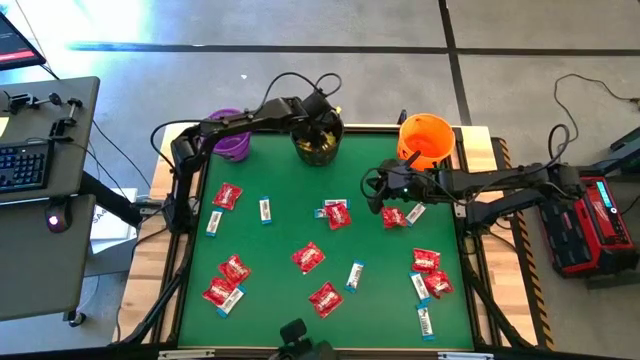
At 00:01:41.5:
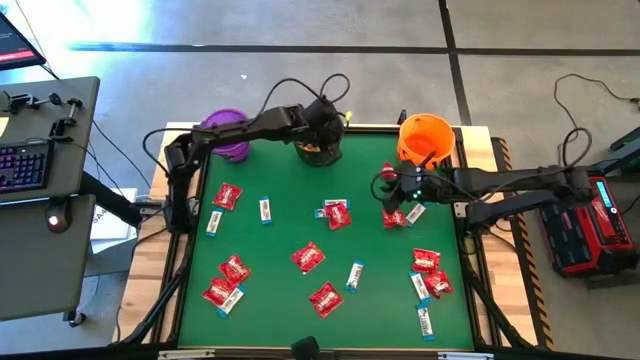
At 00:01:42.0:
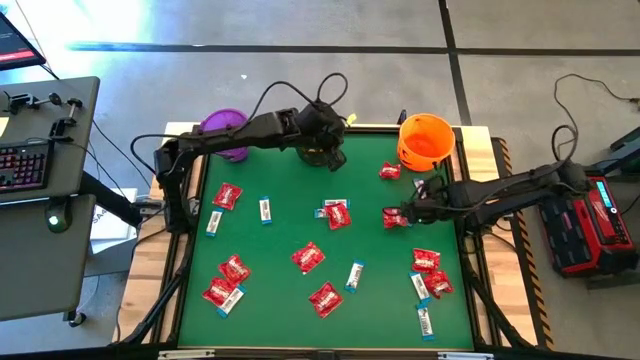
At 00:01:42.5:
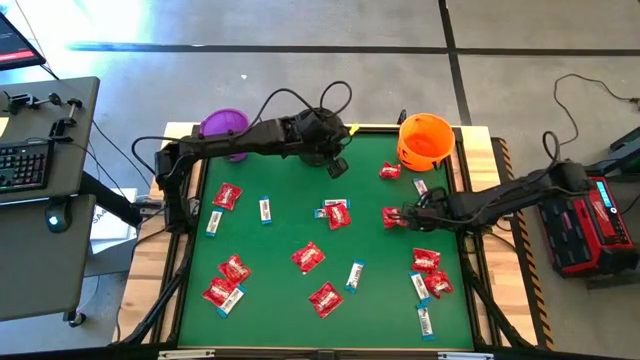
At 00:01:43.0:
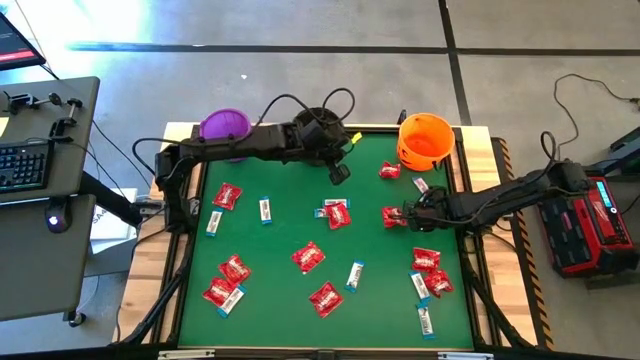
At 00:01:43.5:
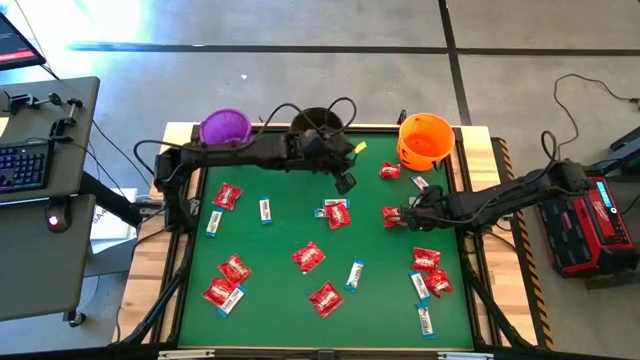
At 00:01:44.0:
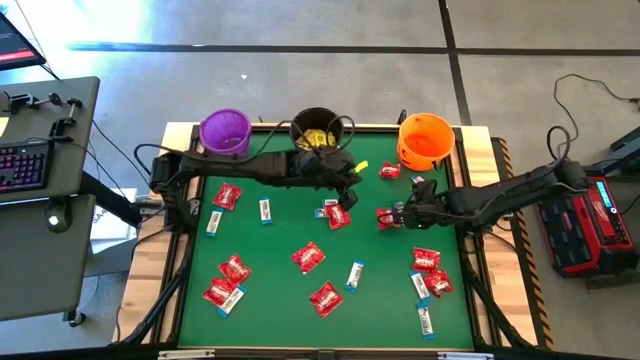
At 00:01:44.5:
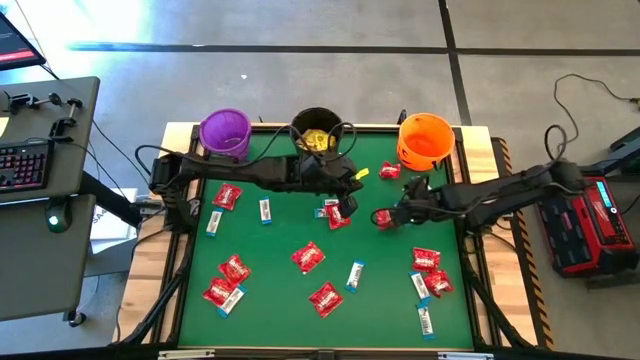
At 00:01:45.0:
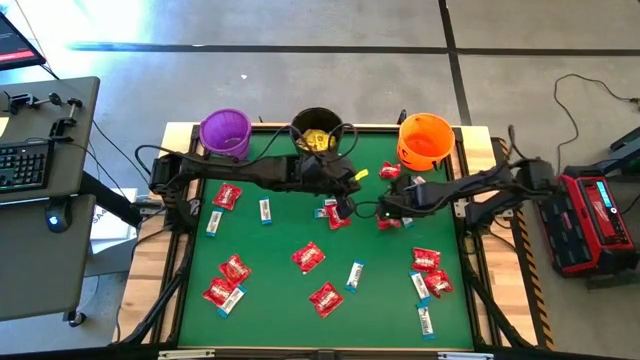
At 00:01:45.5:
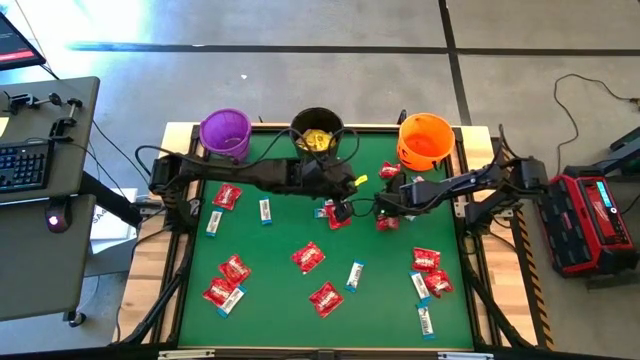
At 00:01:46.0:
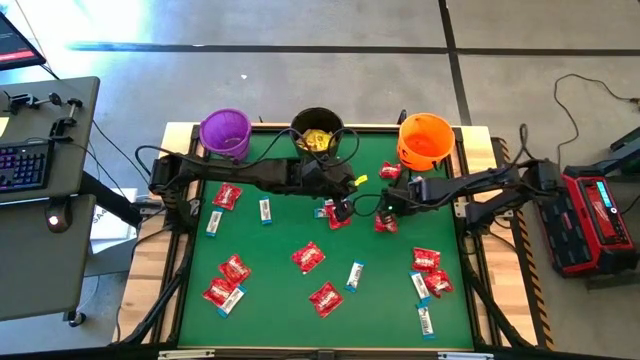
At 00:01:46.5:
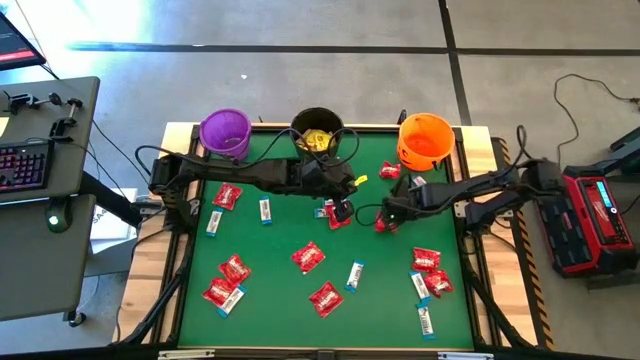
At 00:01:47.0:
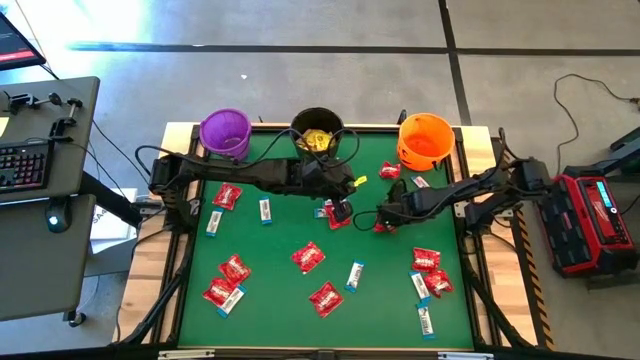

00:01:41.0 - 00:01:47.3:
Task: Sort candy by brand, put in halloween buckets
Put the blue chocolate bar into the orange bucket

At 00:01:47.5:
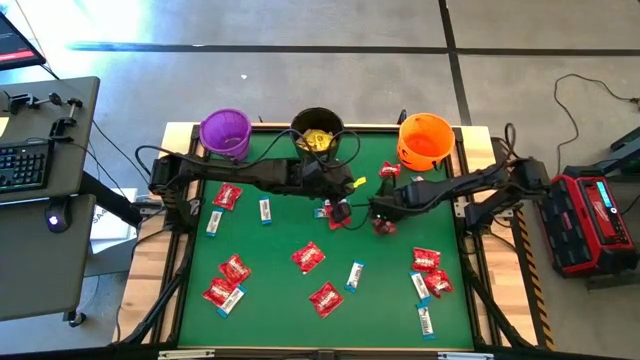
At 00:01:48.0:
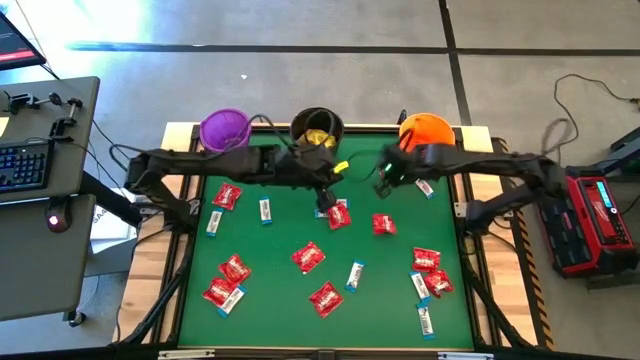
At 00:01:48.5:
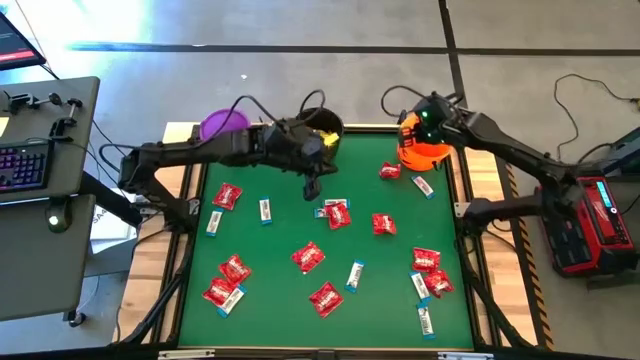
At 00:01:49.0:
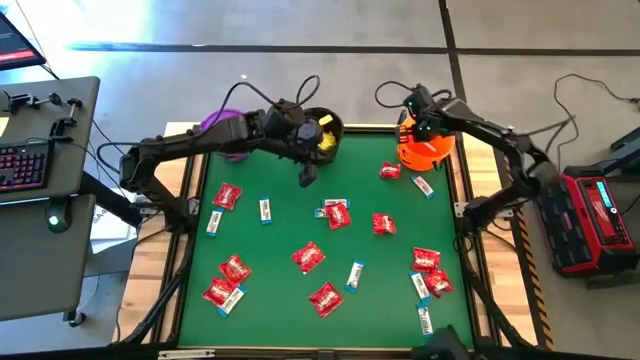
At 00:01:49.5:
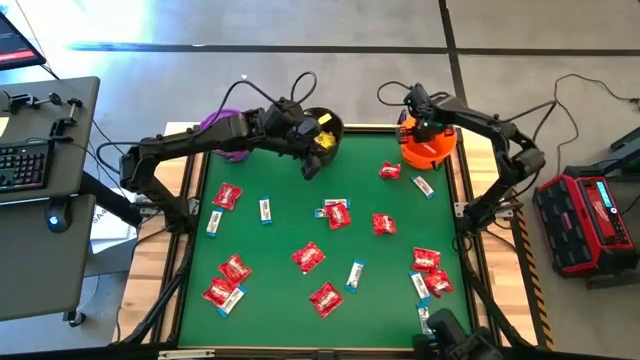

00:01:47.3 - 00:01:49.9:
Put the blue chocolate bar into the orange bucket

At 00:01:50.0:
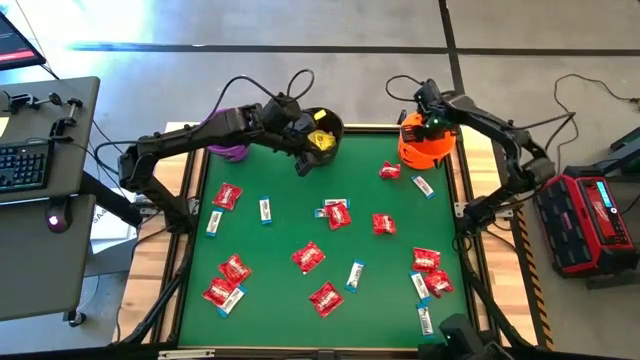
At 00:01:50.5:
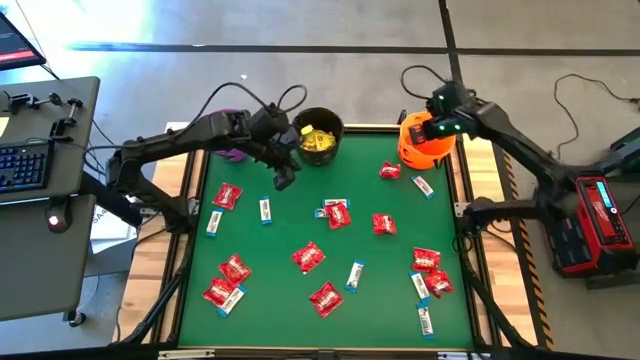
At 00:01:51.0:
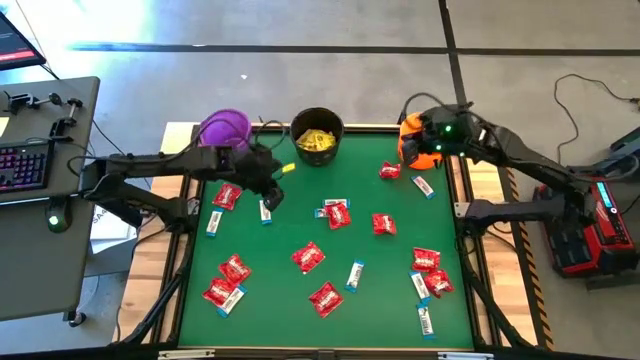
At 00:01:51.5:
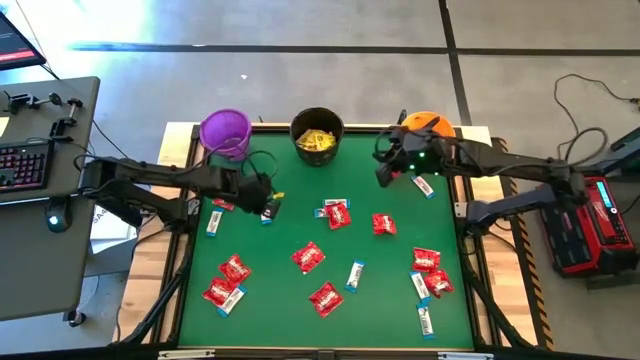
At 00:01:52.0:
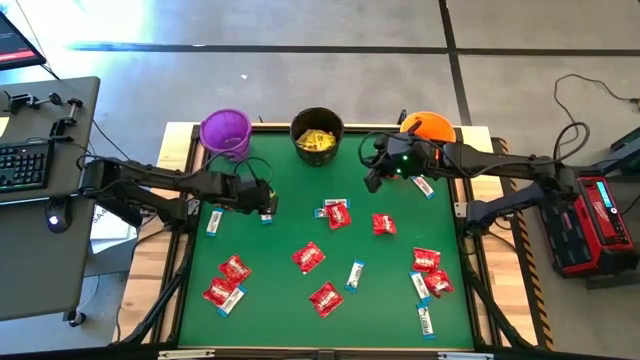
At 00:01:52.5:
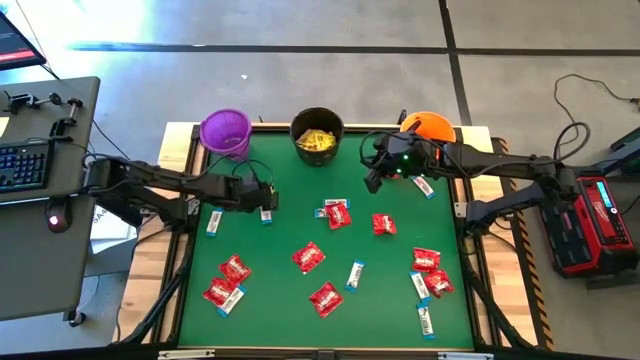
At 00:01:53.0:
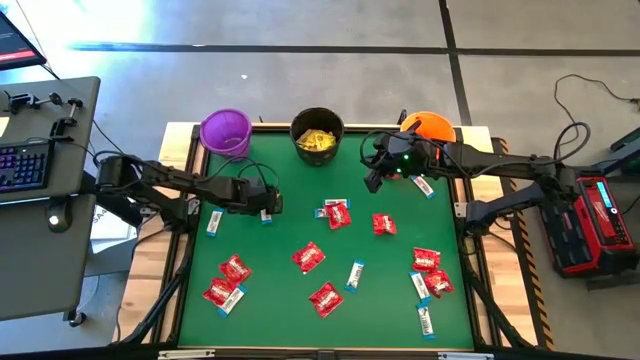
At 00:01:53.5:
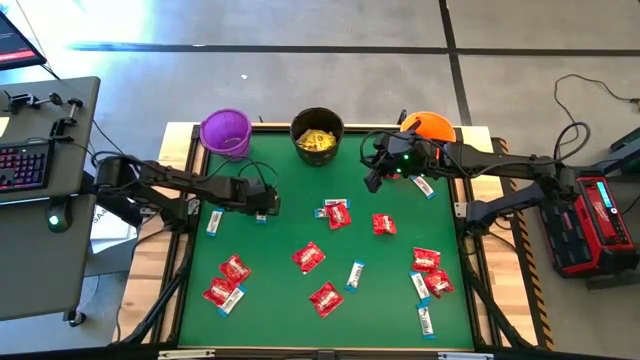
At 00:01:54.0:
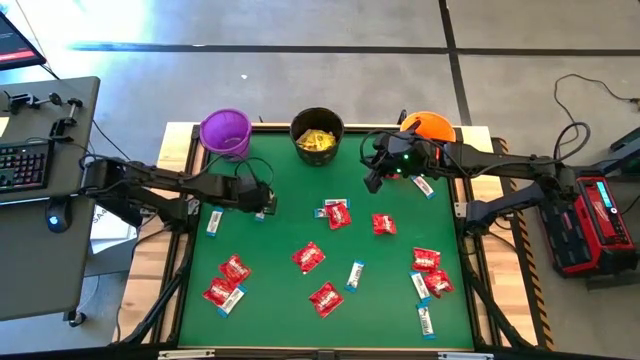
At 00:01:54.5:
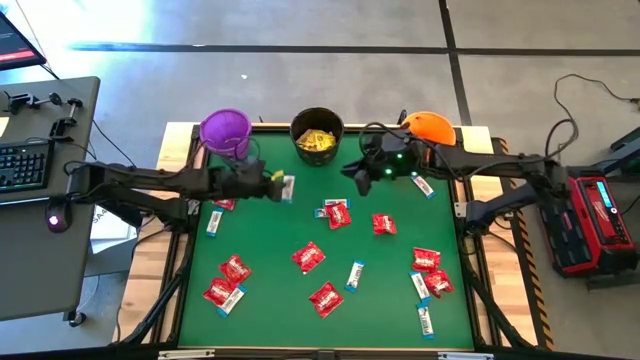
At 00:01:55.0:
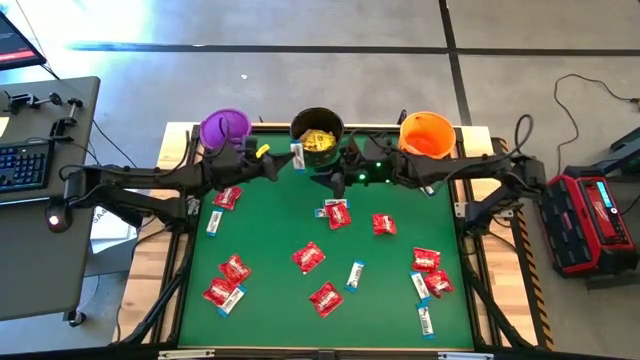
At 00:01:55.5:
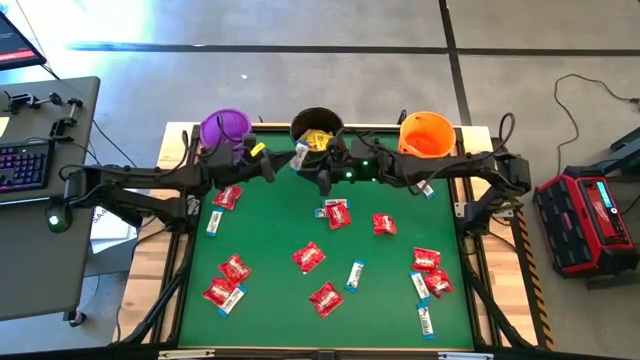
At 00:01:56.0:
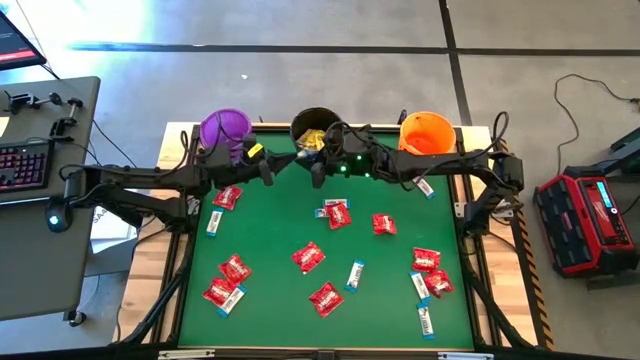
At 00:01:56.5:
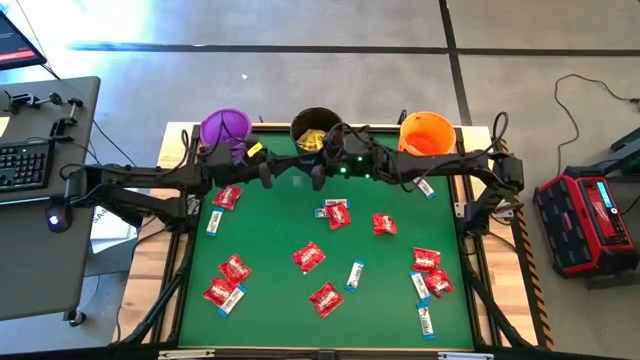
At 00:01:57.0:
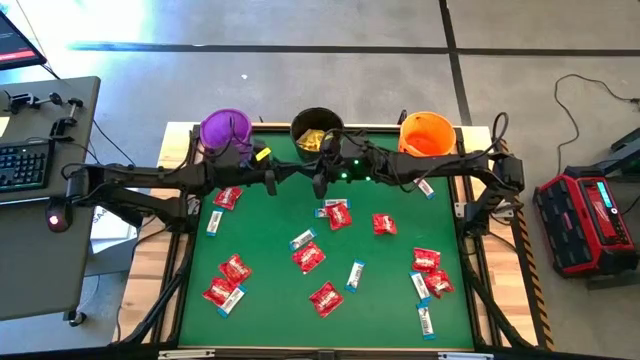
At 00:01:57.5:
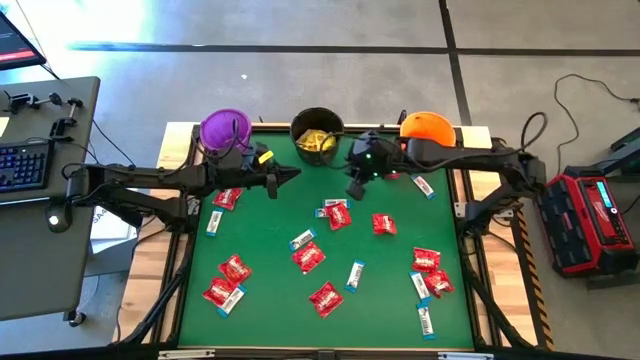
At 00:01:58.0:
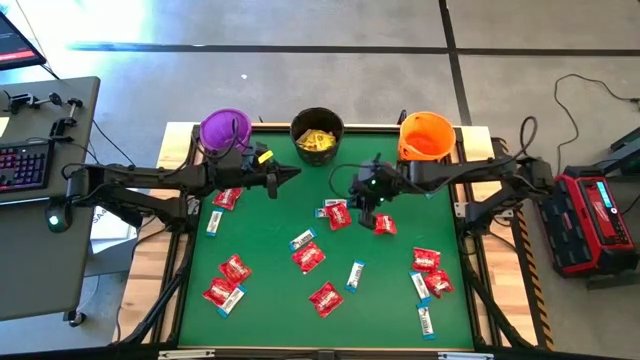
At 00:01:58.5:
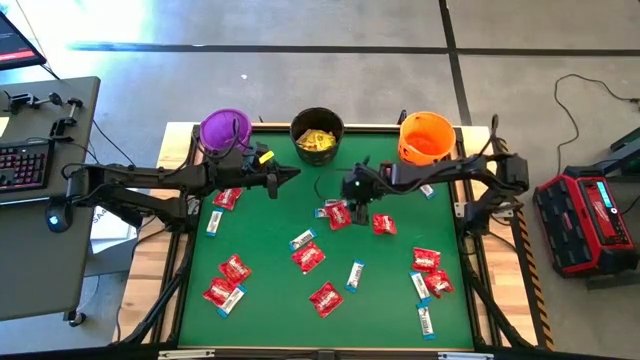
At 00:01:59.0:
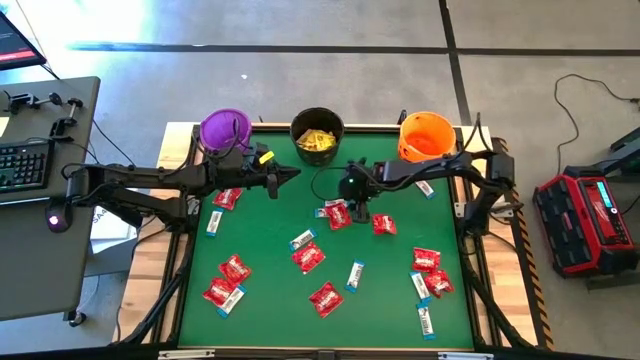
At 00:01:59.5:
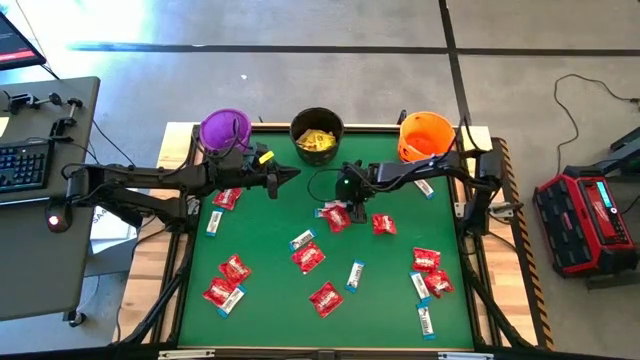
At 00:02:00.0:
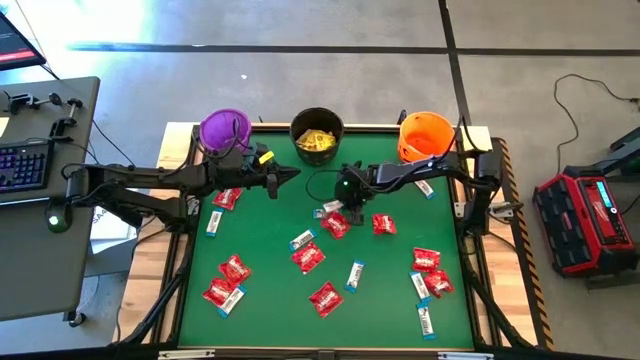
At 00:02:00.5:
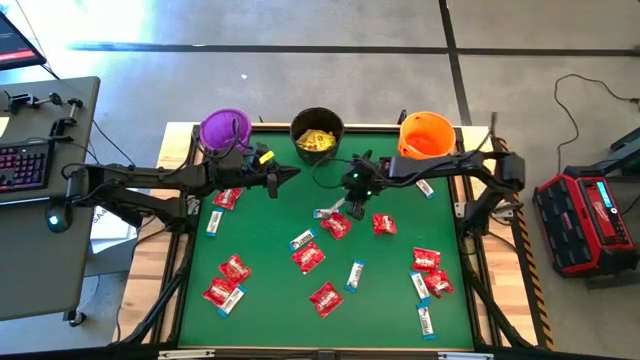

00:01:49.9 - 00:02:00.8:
Put the blue chocolate bar into the orange bucket

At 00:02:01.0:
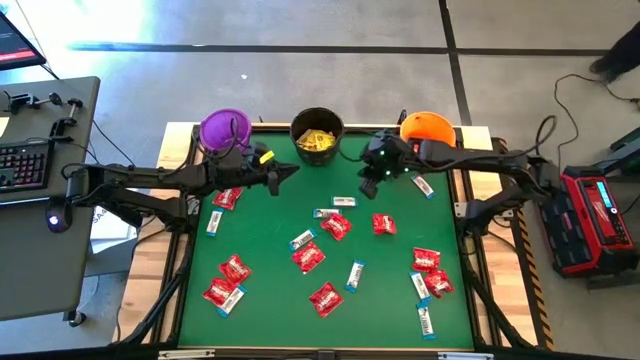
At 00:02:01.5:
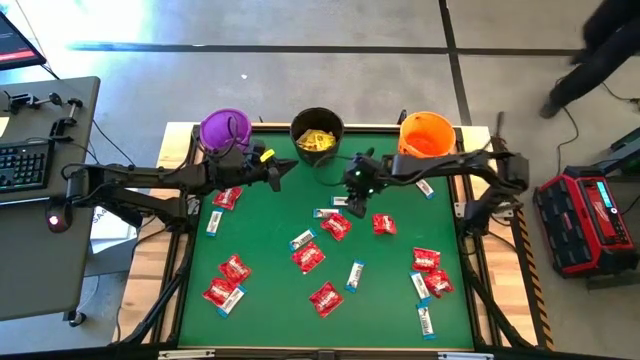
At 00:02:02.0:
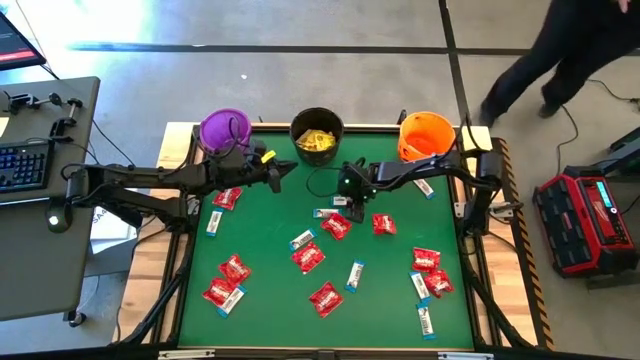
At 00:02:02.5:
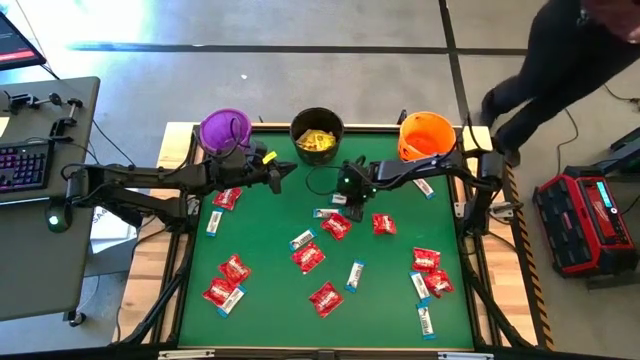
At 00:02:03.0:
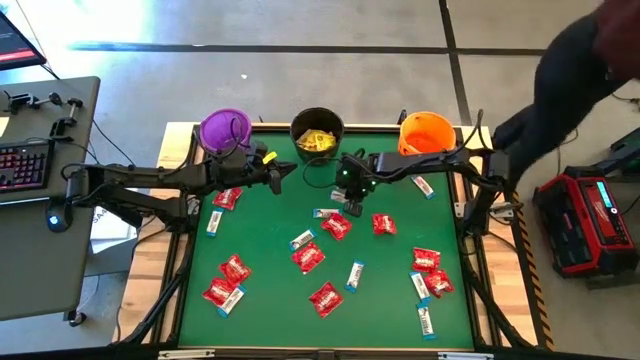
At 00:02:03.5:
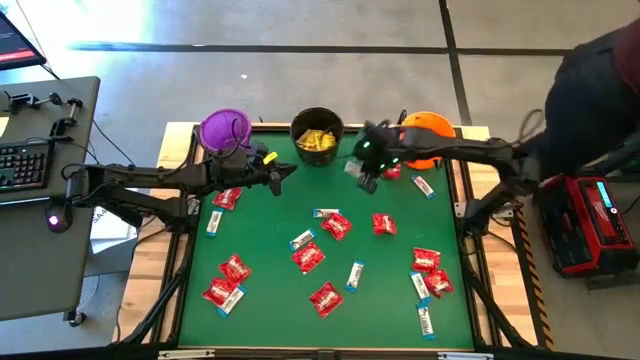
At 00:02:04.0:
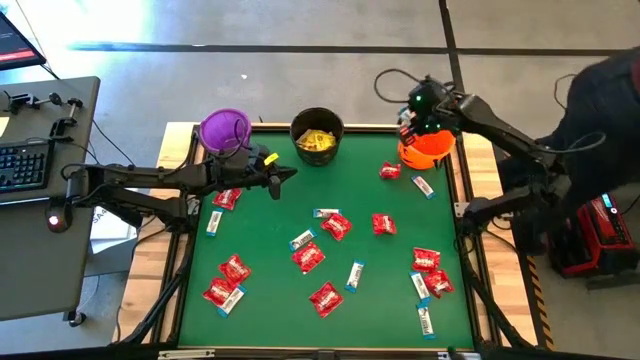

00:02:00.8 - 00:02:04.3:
Put the blue chocolate bar into the orange bucket
